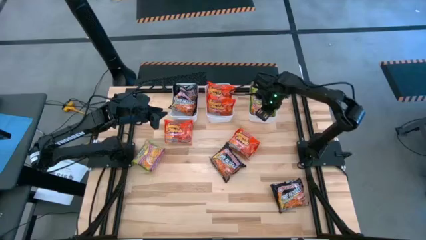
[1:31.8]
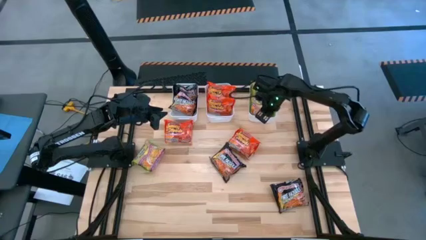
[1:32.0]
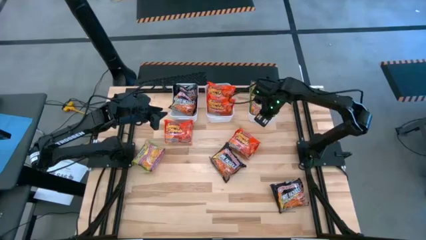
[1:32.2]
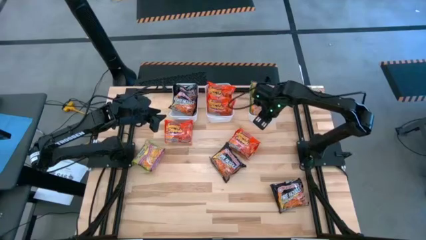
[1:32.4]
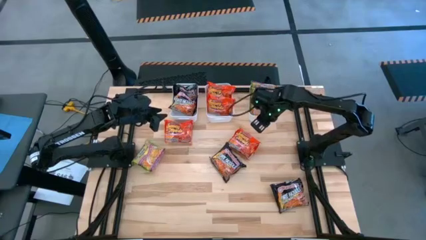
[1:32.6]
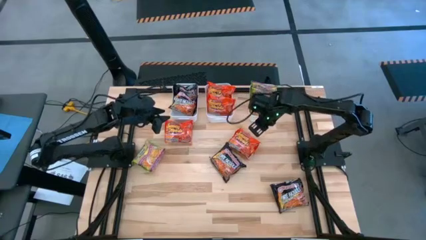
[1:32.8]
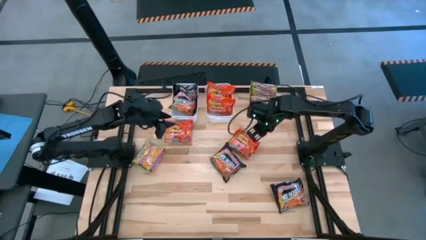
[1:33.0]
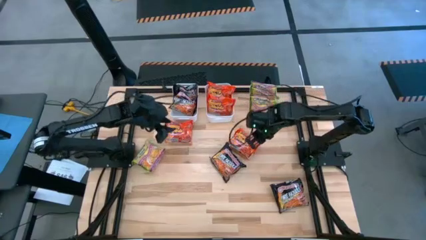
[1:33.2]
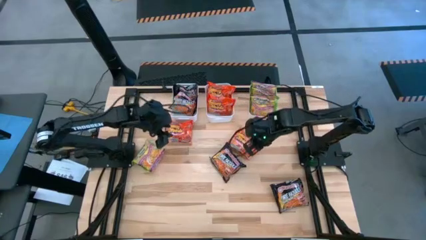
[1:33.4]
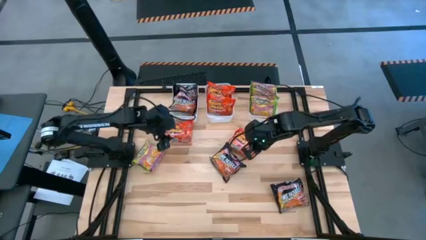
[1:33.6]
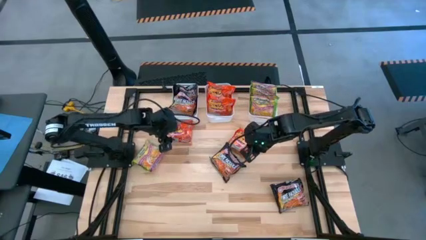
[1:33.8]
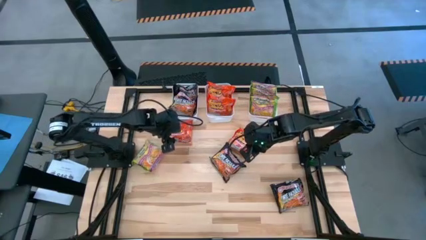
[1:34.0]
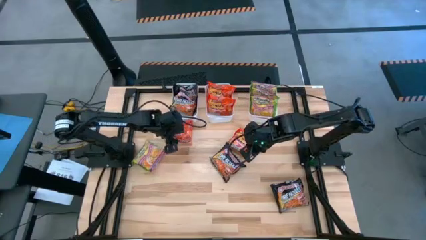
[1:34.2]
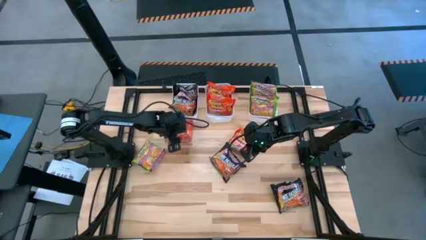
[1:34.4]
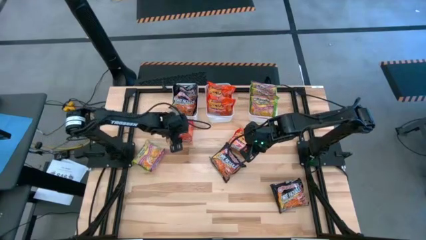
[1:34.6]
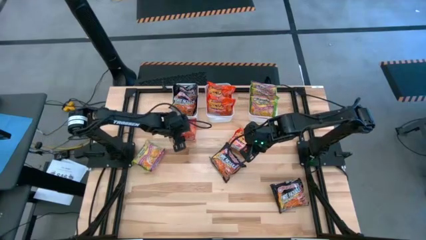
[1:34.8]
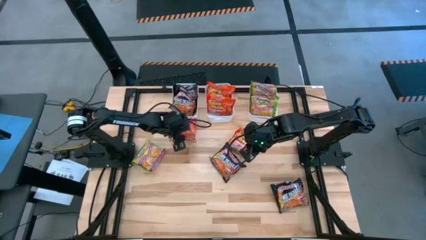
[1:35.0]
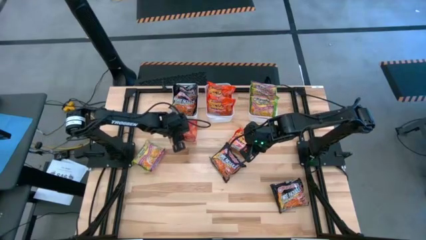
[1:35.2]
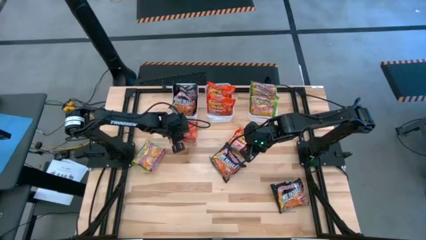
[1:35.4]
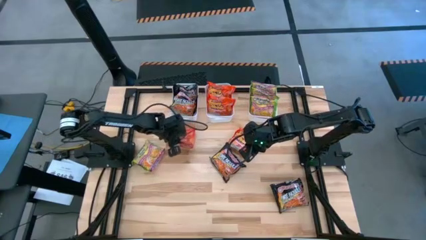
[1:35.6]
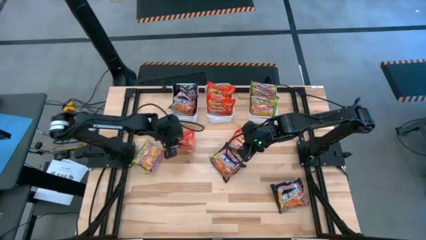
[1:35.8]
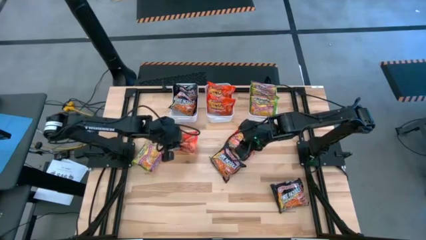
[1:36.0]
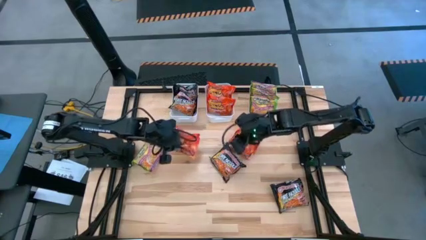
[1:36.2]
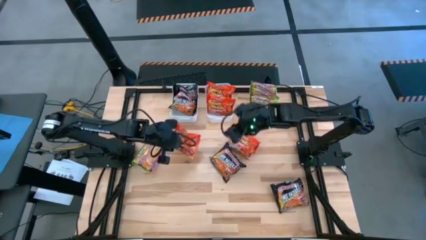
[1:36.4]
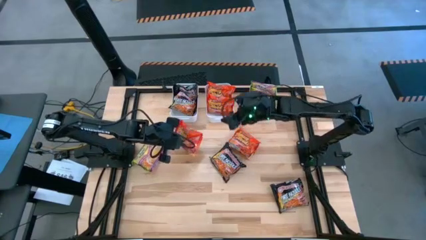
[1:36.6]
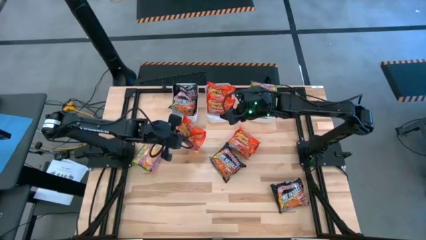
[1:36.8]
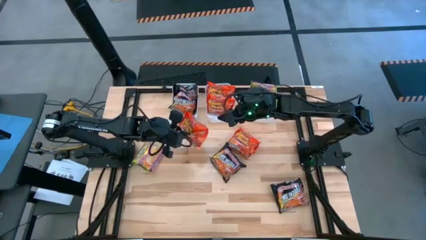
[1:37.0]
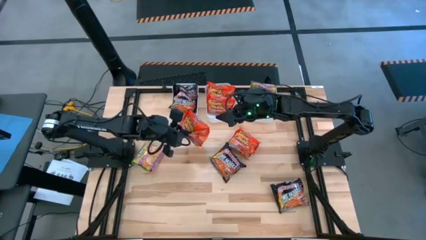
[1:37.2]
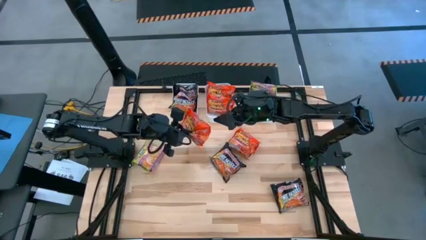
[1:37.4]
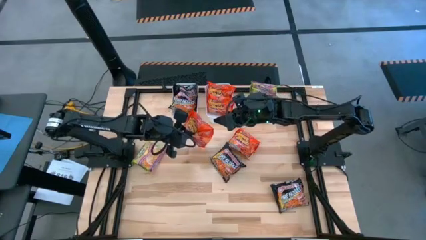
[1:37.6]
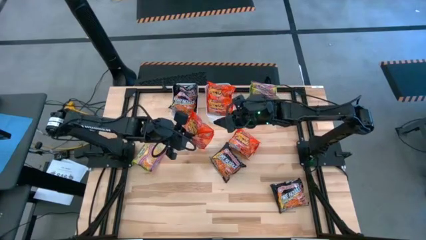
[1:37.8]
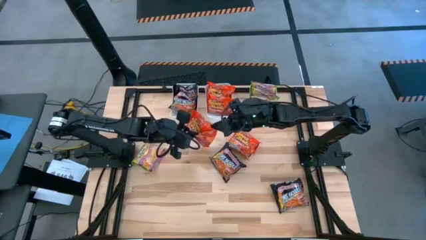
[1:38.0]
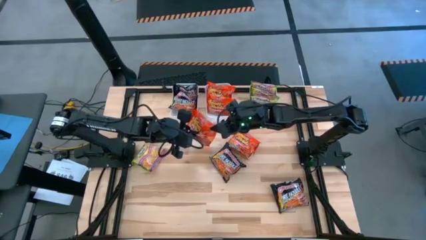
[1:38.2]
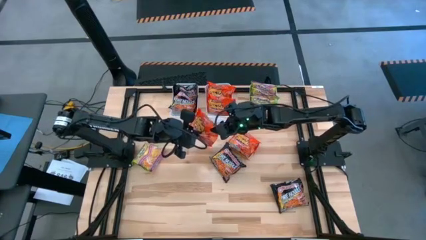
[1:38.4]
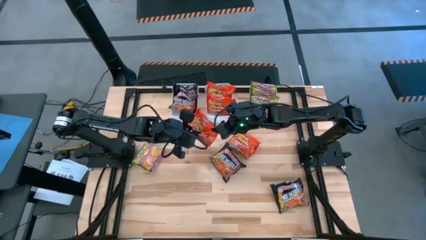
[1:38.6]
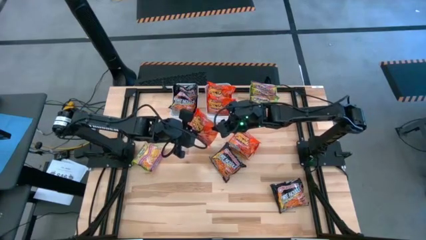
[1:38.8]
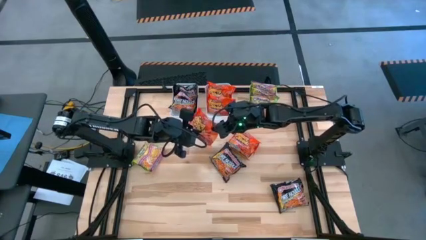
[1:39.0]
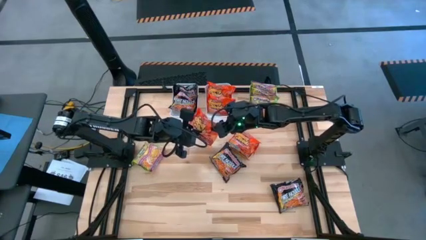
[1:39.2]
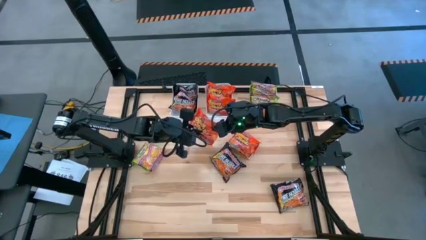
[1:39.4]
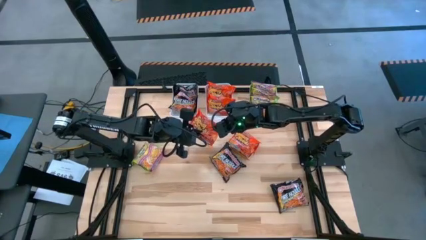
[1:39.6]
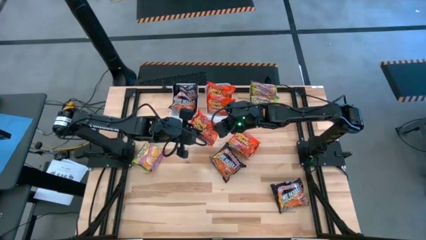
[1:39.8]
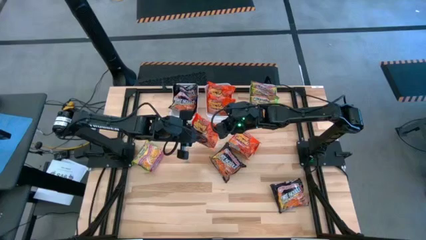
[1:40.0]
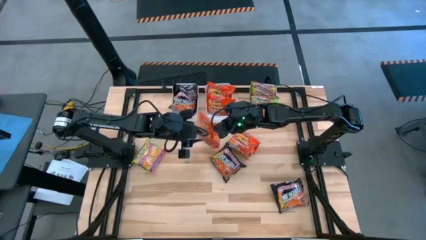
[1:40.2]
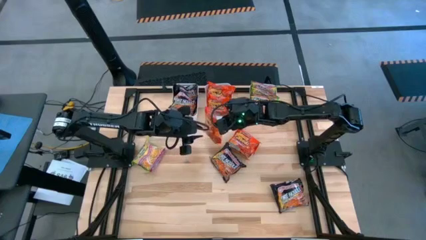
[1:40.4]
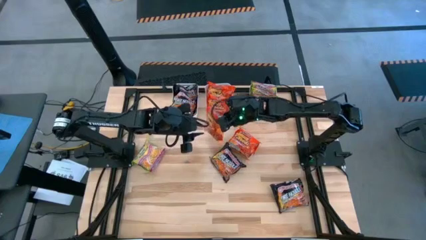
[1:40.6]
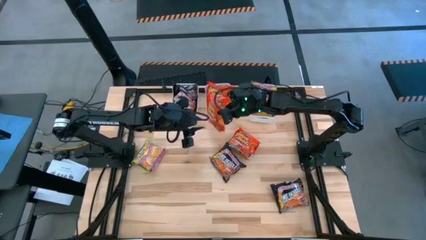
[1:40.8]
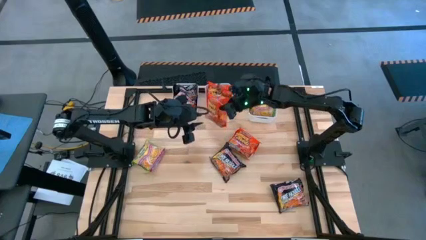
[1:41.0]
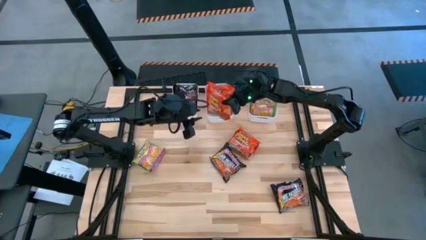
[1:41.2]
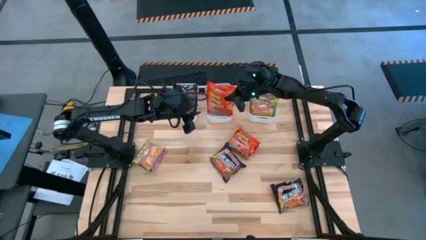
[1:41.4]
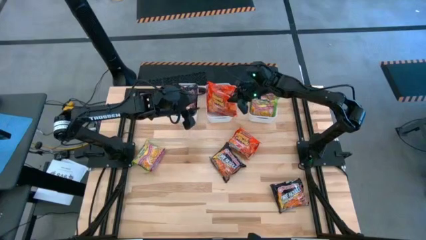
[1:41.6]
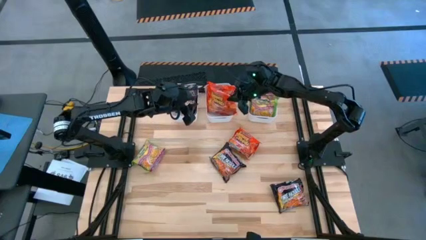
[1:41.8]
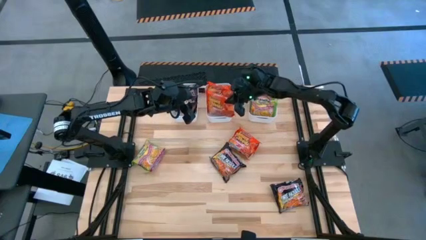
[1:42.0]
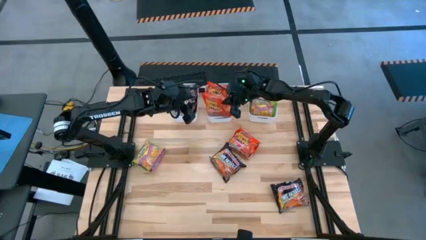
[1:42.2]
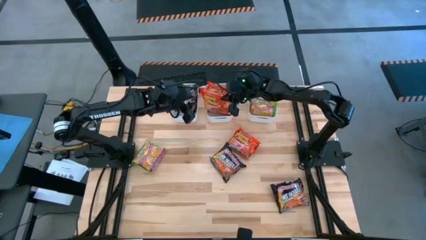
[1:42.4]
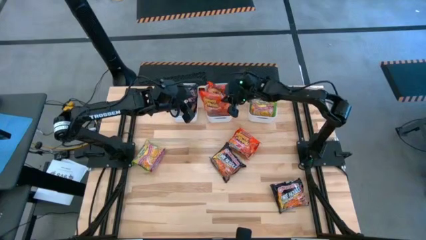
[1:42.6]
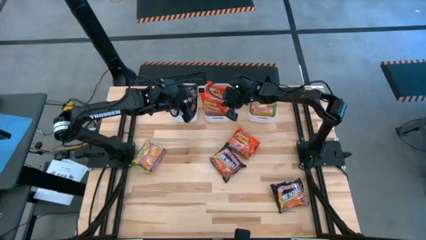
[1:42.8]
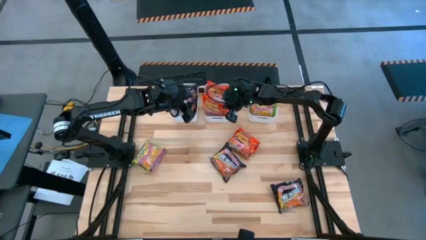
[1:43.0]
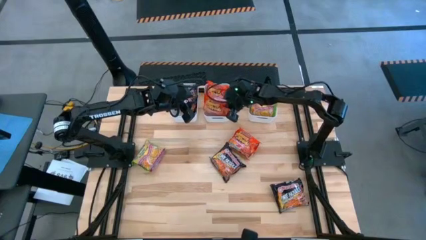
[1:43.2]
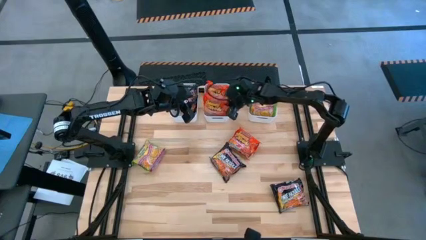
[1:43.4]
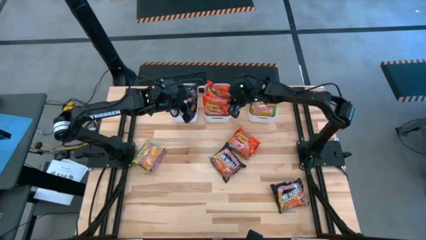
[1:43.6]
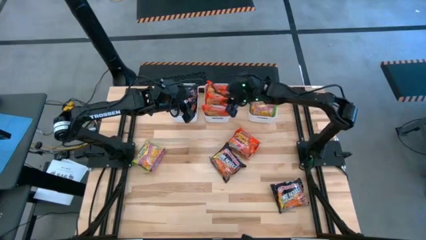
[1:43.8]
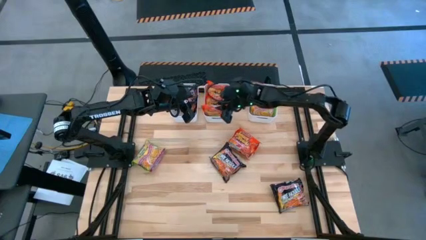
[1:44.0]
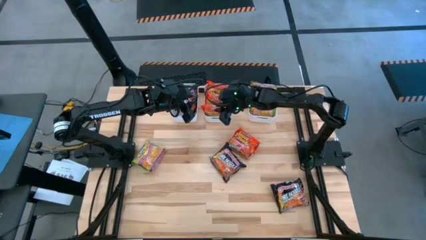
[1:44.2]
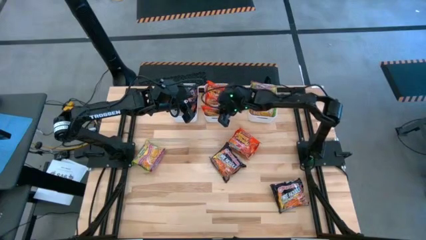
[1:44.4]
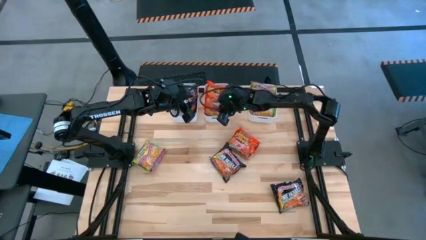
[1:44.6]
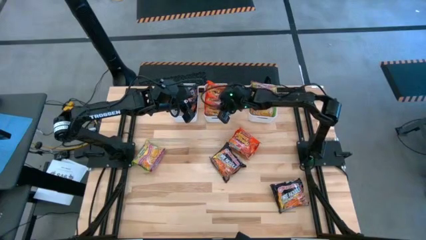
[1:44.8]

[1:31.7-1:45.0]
Task: Sort Maruchan noodles
Put the orange noodle pack into the middle white bin
